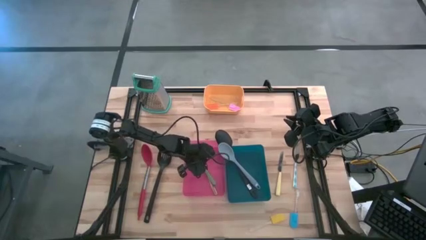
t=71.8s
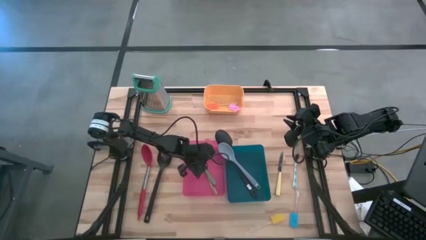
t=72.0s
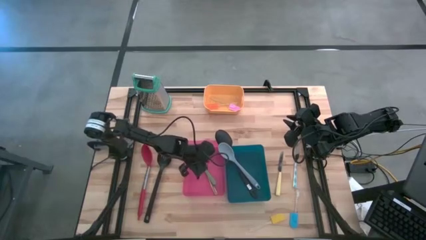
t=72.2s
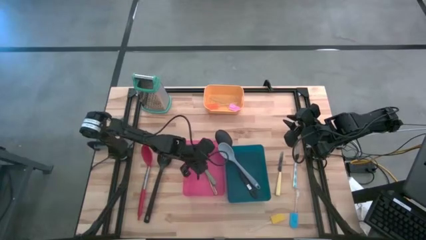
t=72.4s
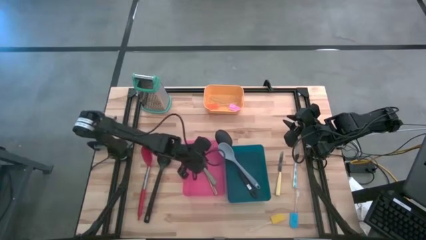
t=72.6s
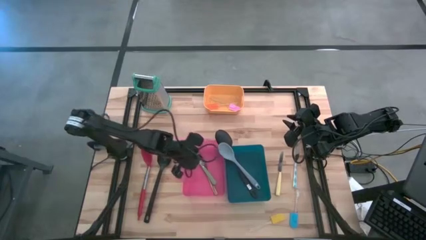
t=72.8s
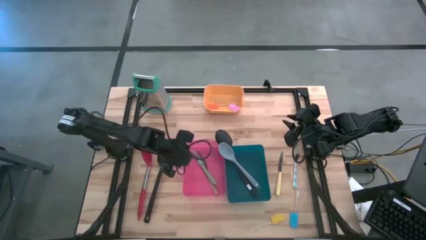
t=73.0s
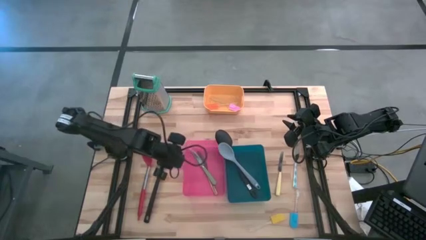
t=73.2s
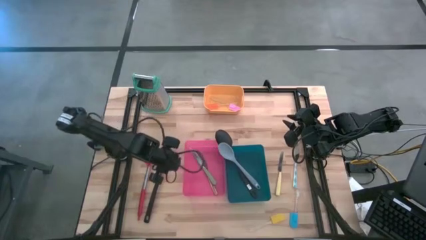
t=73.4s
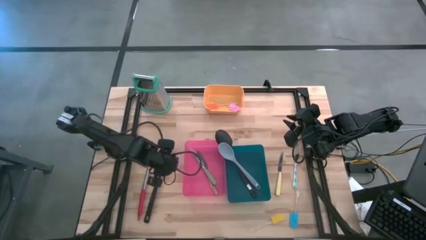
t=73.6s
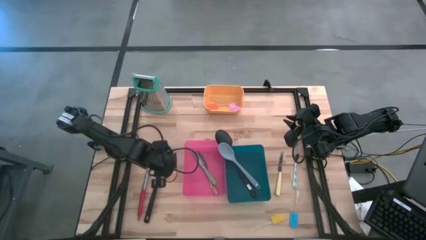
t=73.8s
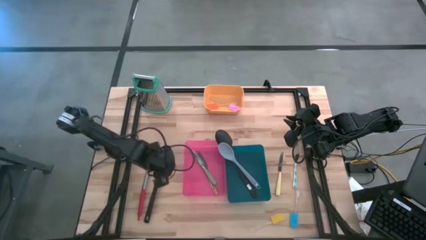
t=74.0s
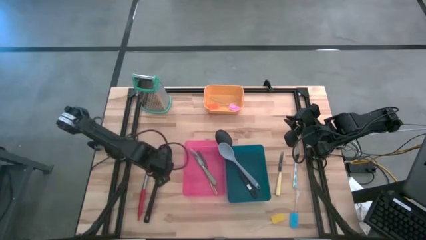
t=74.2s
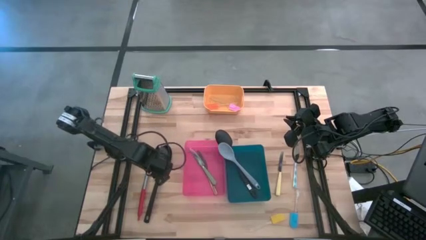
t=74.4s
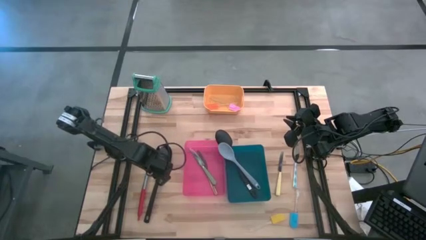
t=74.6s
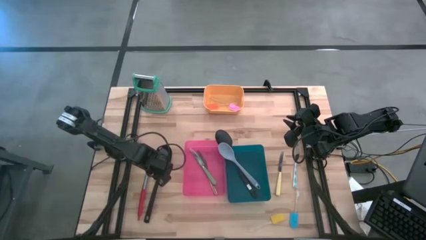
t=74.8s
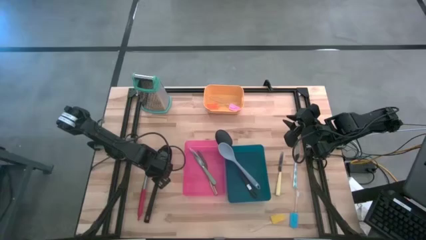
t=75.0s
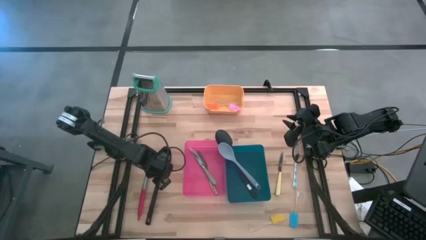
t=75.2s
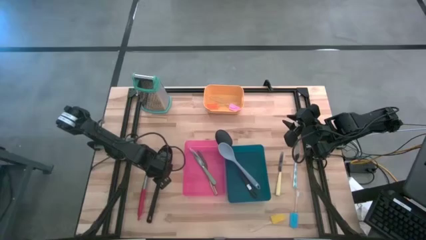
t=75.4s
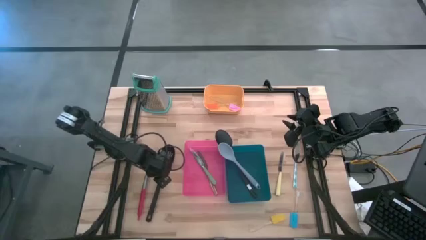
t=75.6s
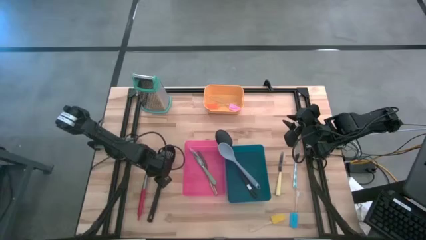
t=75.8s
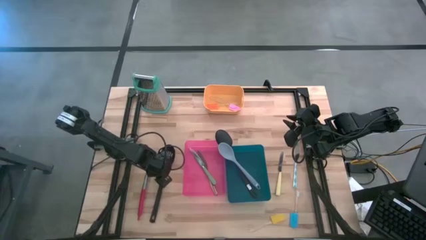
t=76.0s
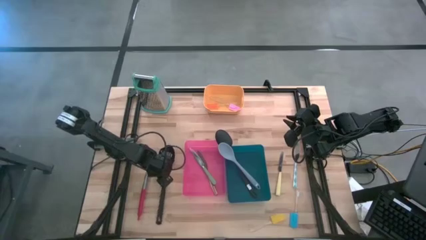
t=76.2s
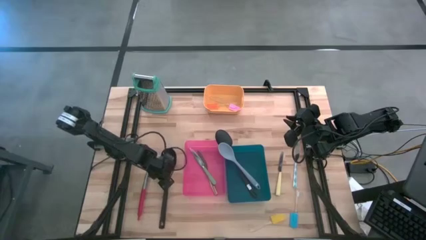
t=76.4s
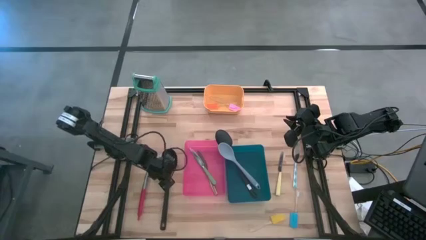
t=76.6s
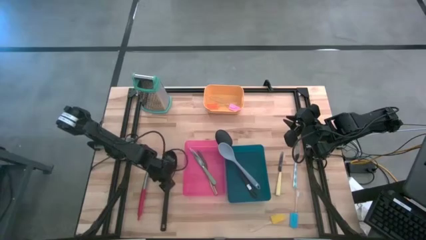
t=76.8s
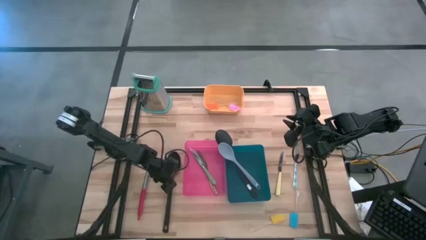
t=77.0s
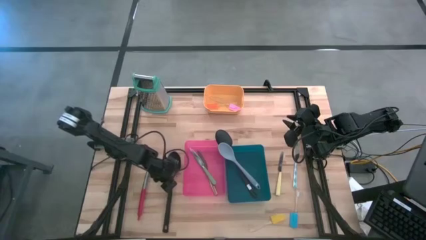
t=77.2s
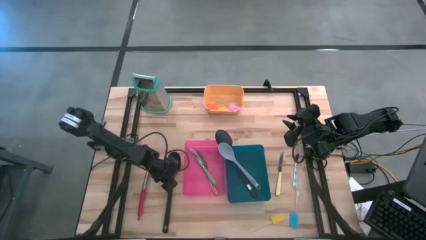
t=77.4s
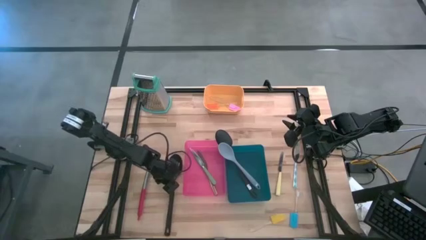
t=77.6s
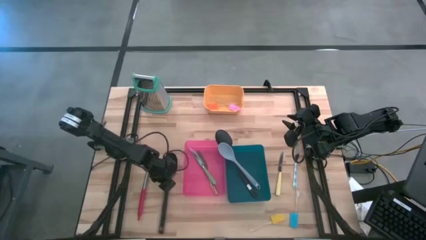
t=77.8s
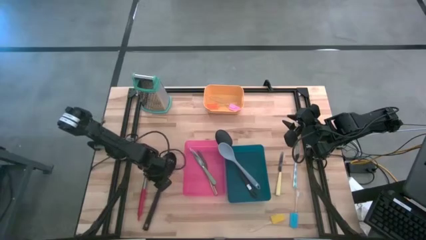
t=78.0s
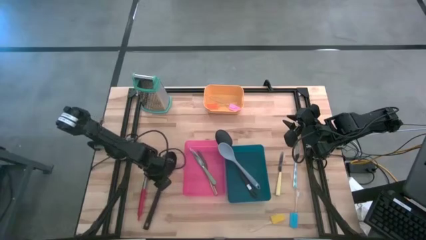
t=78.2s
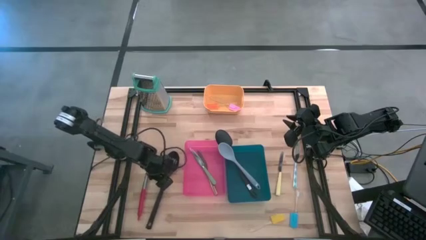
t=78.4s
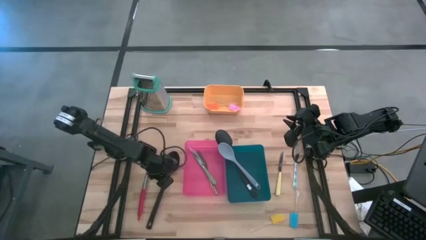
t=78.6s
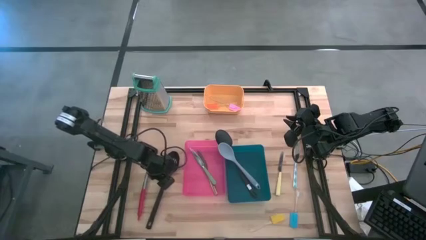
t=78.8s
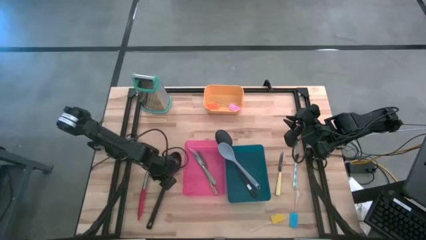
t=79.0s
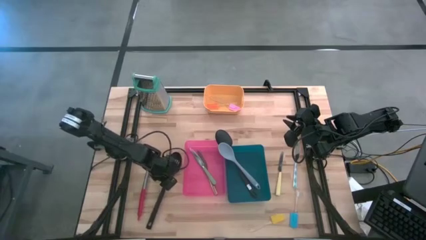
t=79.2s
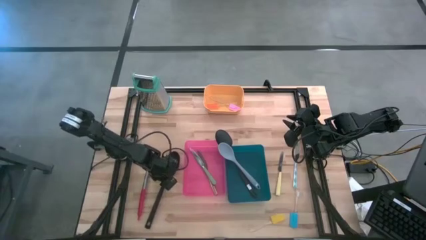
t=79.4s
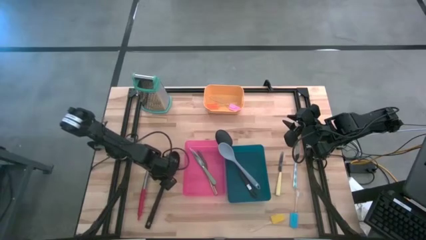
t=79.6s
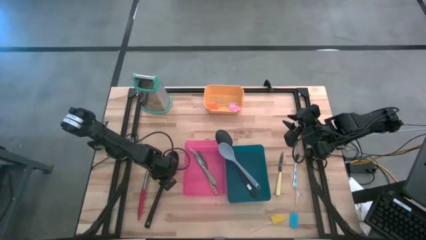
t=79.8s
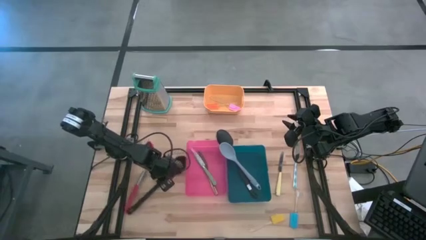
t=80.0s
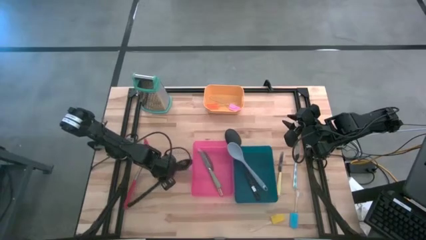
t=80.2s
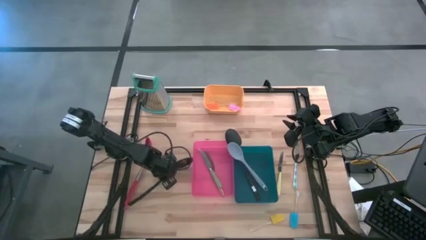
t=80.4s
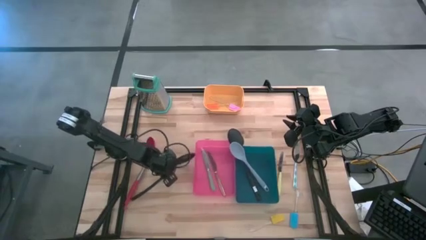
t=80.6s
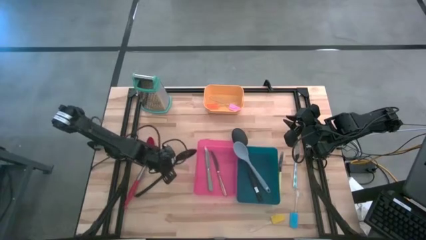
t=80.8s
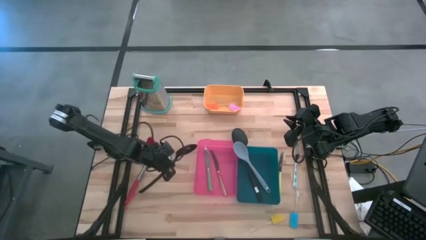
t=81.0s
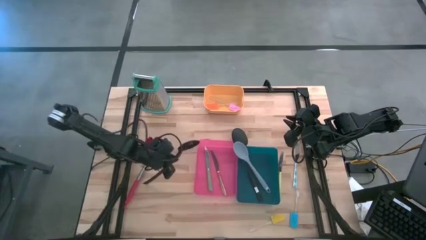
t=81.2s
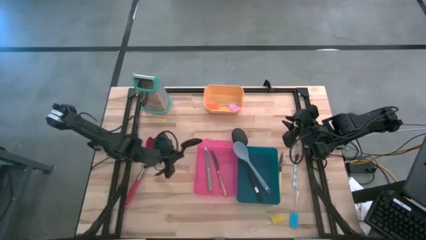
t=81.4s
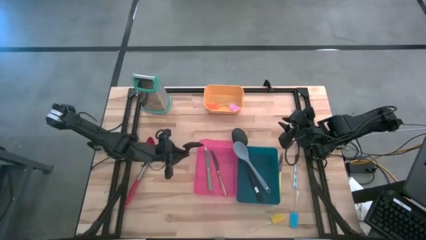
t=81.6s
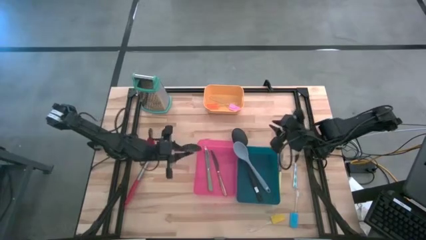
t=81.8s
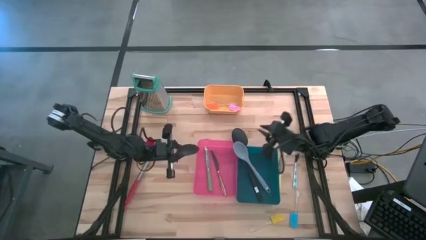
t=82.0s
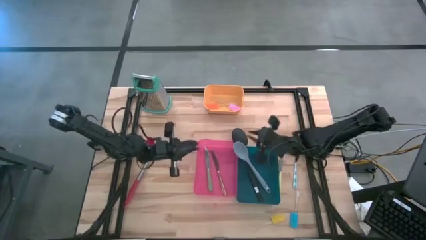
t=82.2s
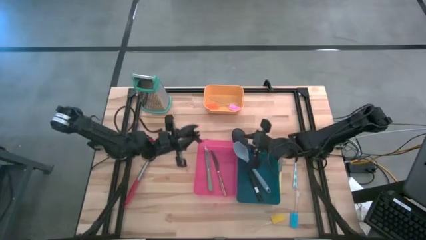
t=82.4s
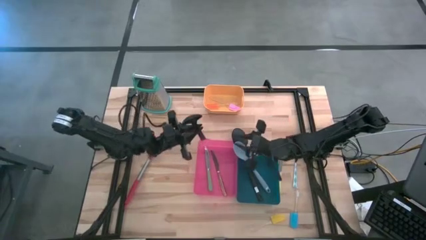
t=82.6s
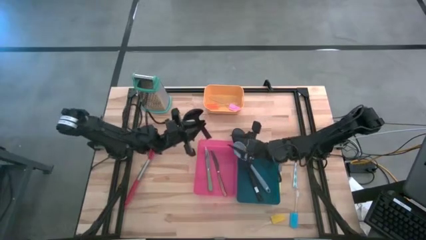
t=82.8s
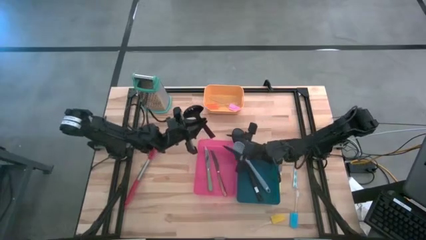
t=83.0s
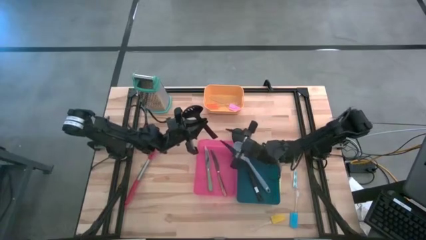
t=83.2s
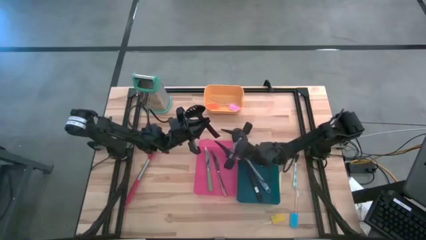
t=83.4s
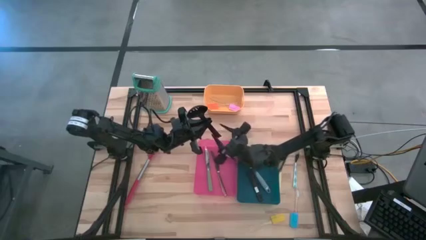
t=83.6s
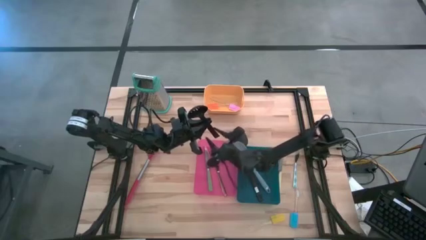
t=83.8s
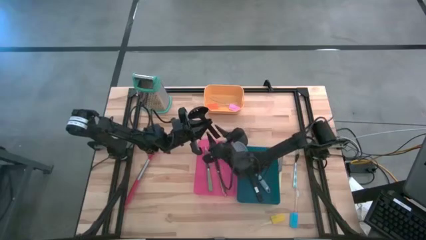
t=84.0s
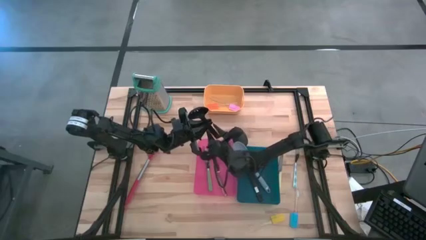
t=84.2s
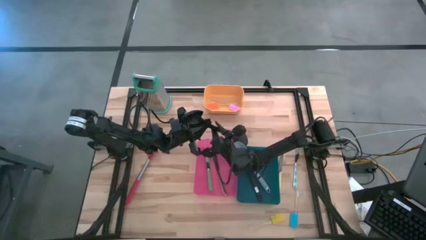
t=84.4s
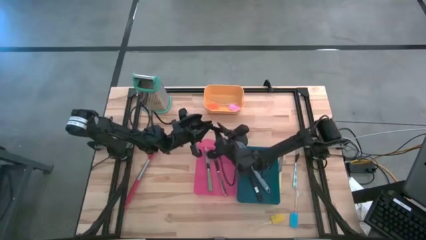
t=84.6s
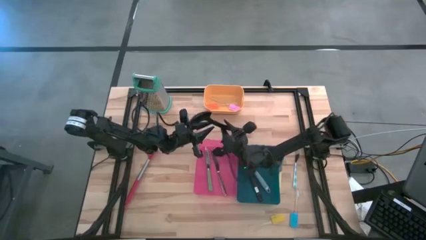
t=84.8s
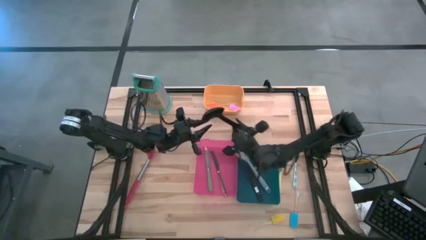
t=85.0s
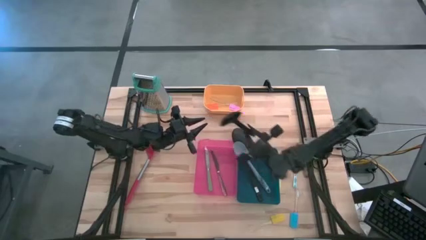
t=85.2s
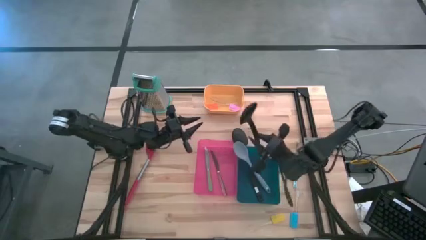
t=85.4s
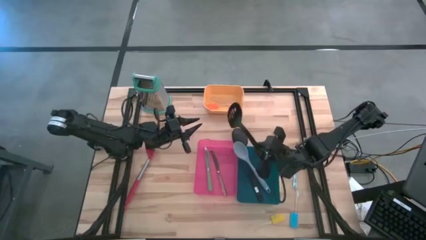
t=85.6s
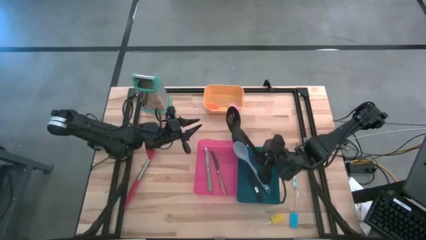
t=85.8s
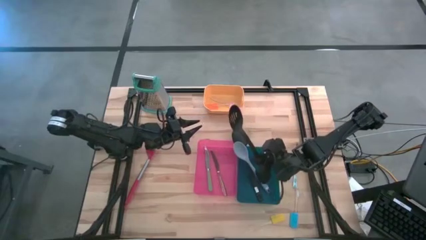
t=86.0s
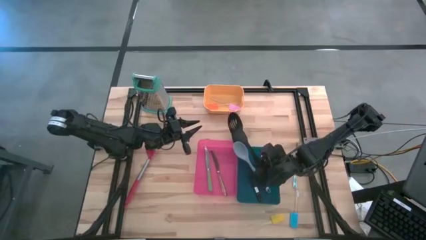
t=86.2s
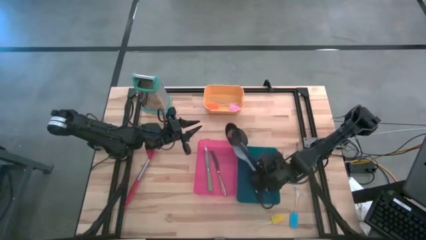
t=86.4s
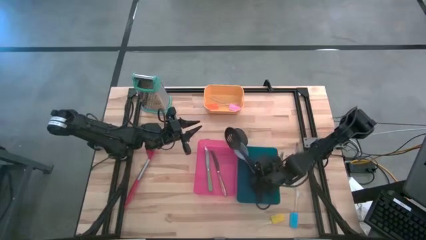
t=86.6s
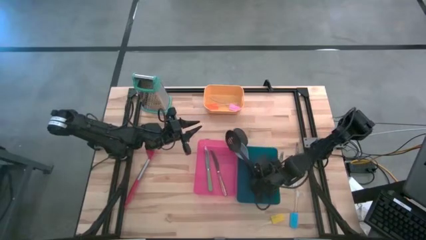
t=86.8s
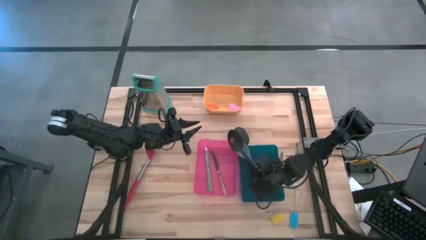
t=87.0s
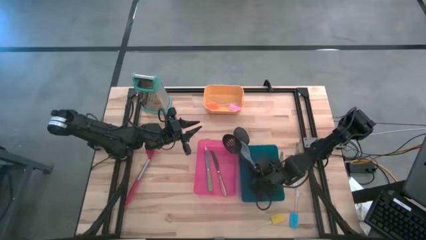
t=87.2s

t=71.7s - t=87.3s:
Task: Pick & Place Kitchen Items
Put the black spoon into the blue bin

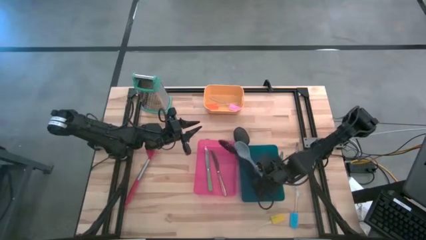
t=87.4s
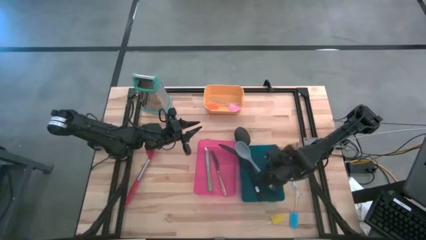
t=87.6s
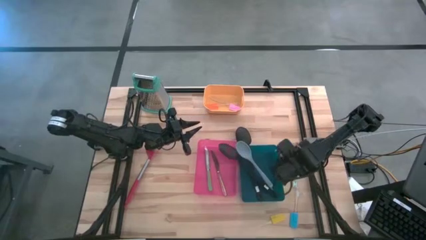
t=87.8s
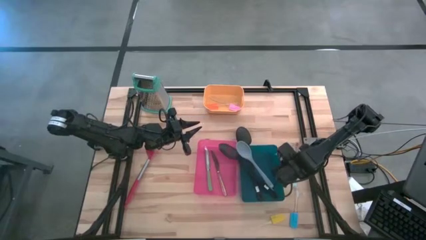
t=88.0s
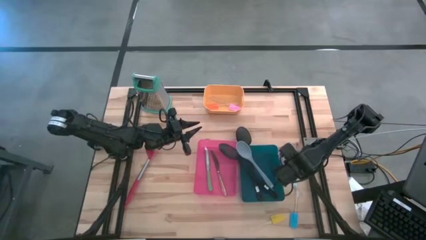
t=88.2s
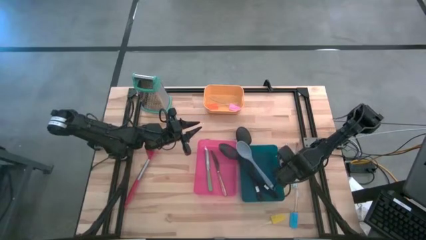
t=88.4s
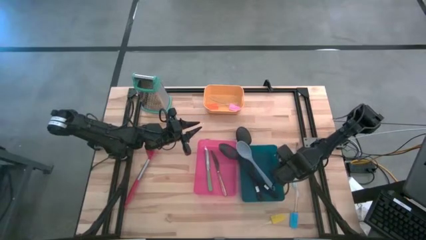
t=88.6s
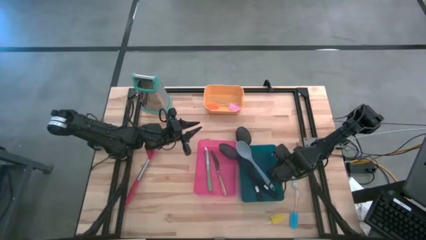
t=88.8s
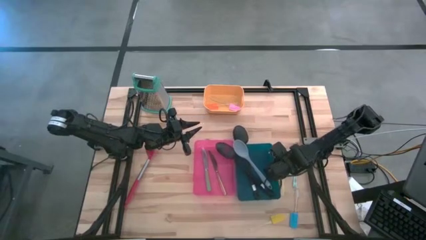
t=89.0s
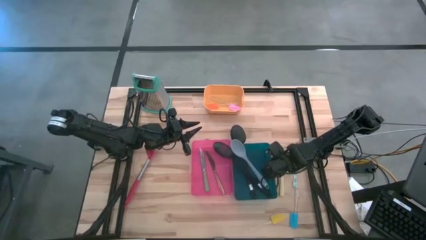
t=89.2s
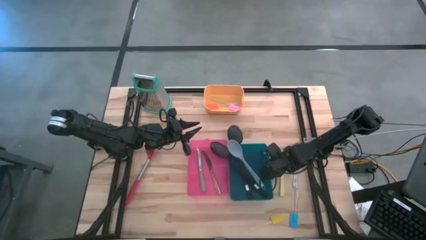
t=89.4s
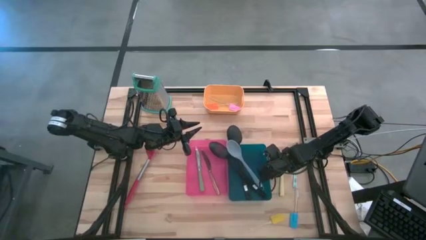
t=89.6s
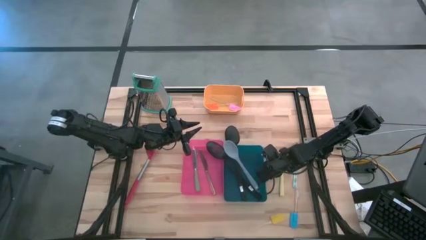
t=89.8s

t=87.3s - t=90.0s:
Adjust the blue bin
